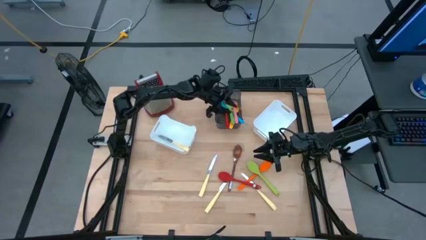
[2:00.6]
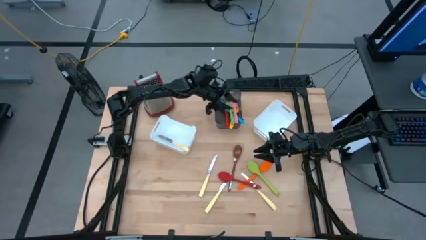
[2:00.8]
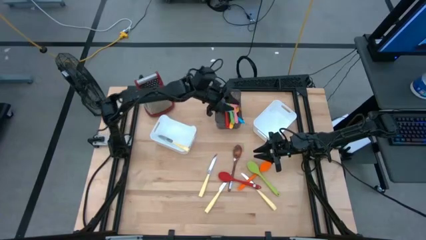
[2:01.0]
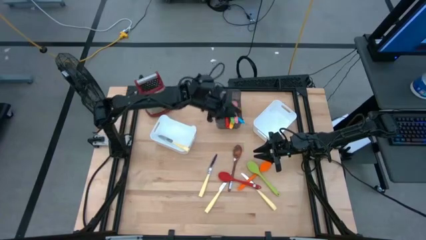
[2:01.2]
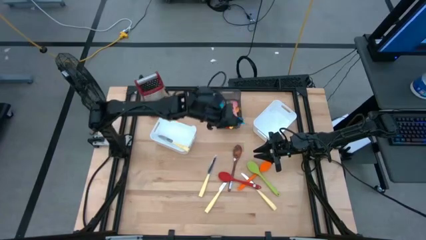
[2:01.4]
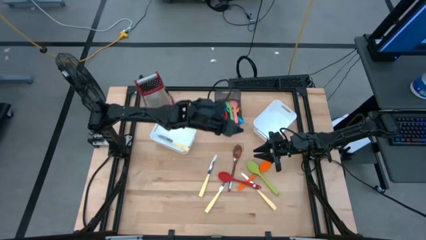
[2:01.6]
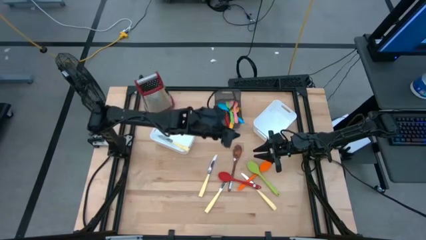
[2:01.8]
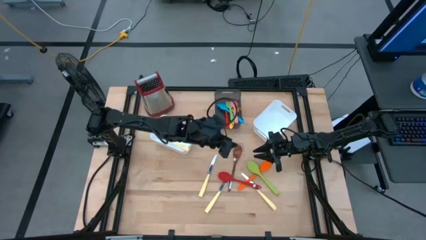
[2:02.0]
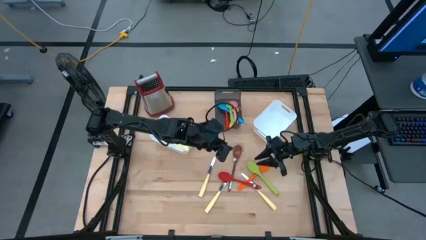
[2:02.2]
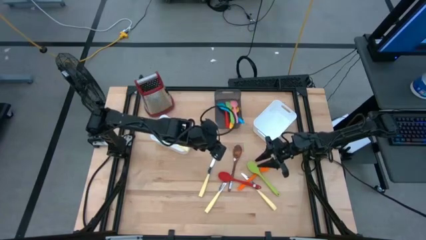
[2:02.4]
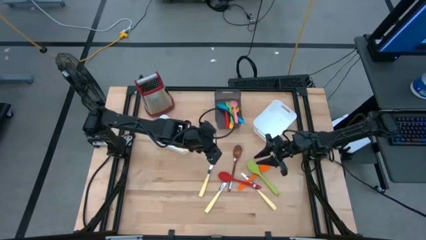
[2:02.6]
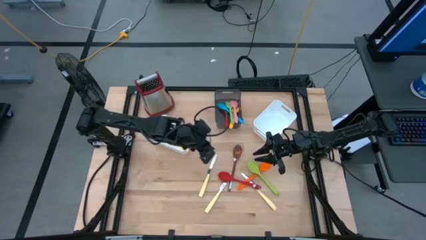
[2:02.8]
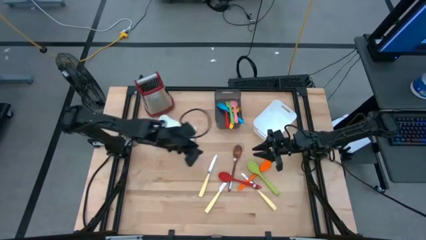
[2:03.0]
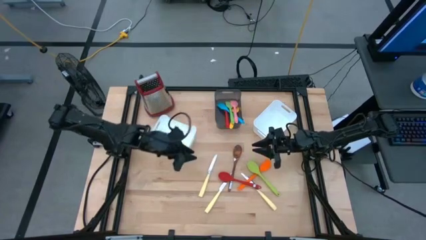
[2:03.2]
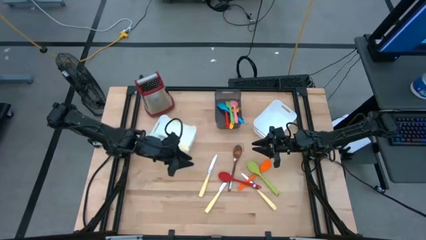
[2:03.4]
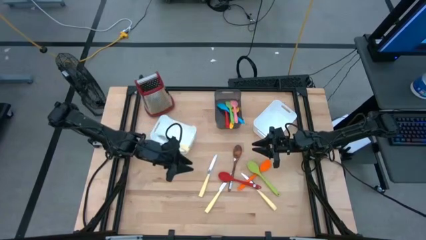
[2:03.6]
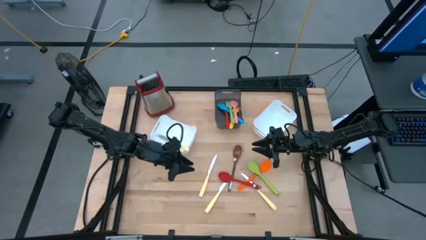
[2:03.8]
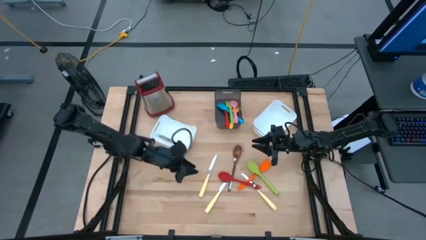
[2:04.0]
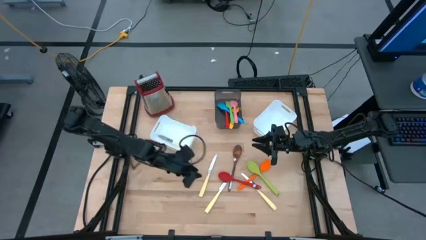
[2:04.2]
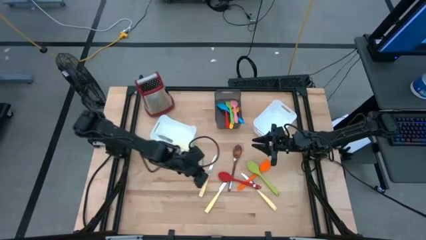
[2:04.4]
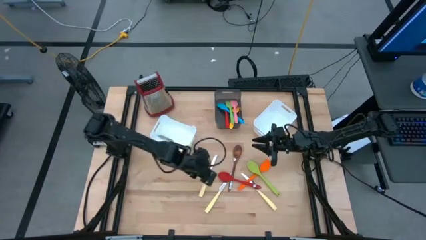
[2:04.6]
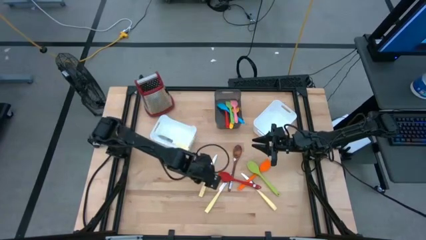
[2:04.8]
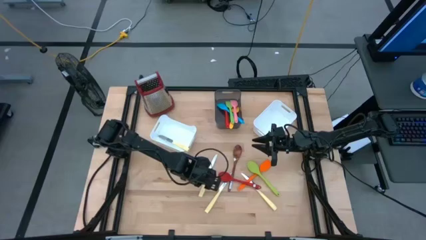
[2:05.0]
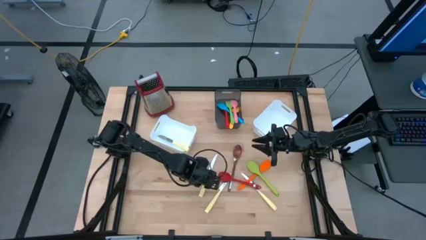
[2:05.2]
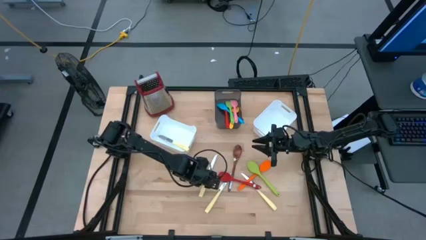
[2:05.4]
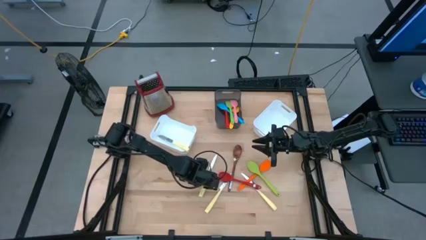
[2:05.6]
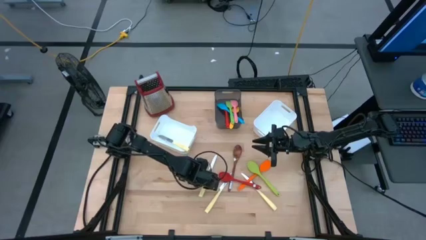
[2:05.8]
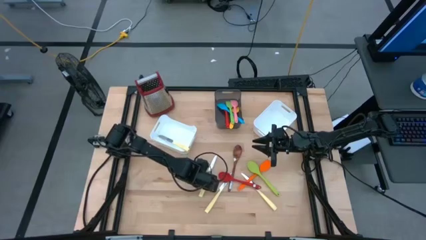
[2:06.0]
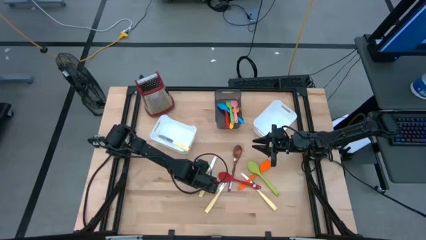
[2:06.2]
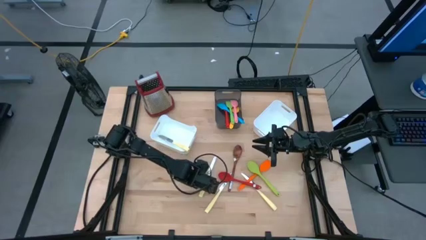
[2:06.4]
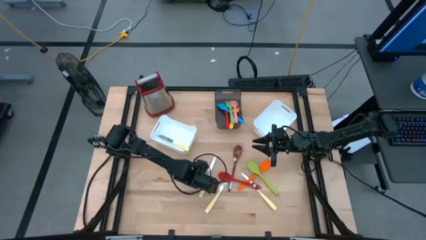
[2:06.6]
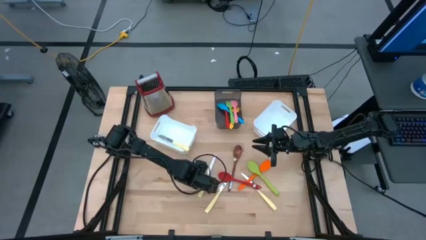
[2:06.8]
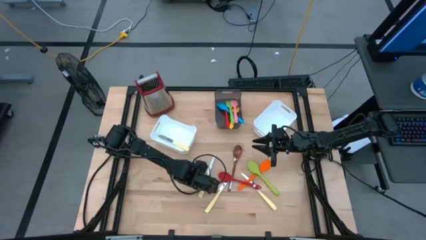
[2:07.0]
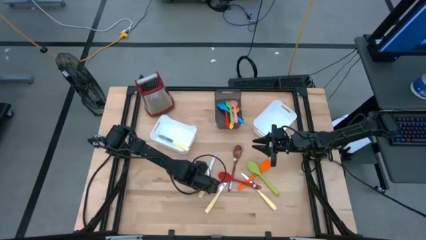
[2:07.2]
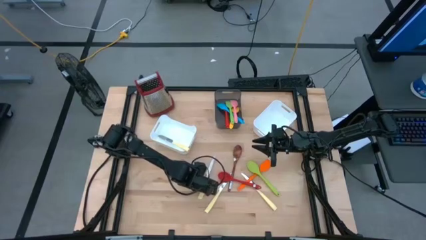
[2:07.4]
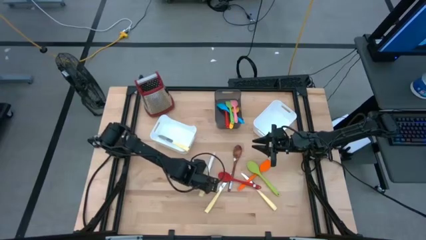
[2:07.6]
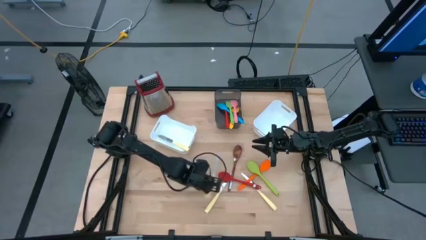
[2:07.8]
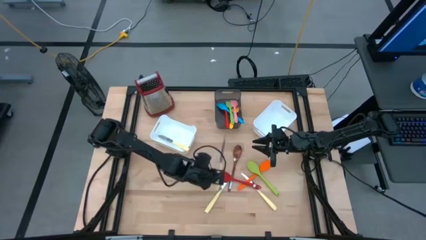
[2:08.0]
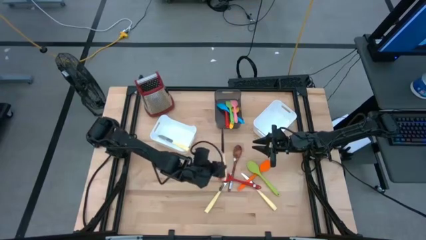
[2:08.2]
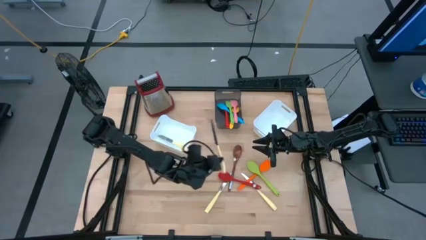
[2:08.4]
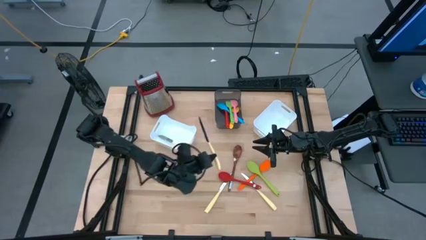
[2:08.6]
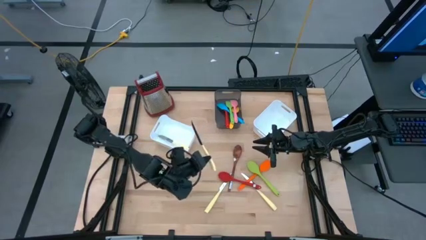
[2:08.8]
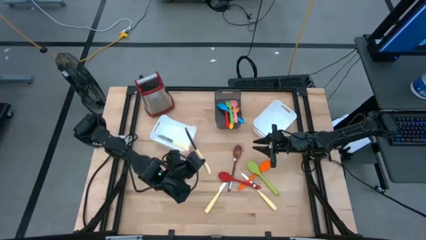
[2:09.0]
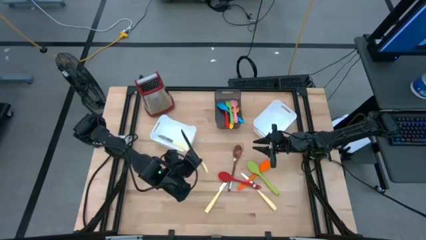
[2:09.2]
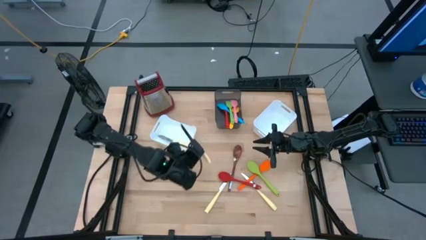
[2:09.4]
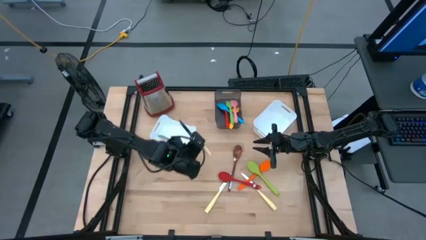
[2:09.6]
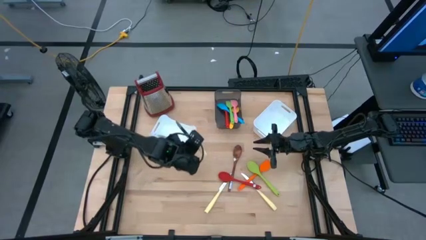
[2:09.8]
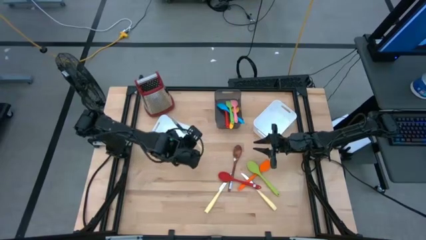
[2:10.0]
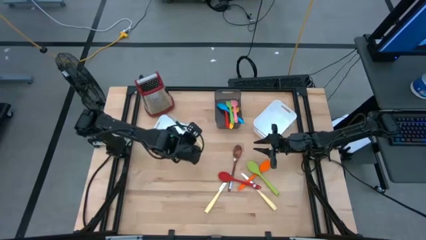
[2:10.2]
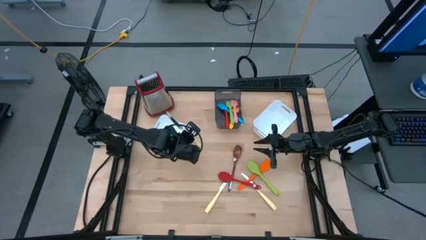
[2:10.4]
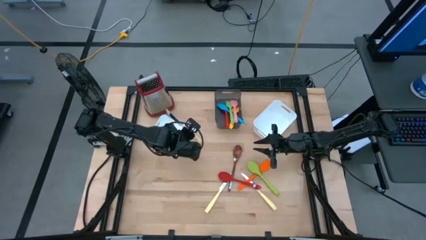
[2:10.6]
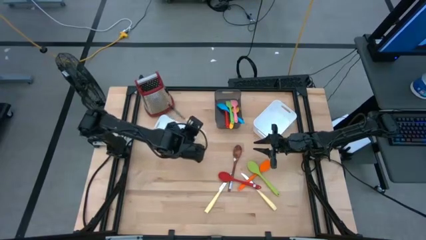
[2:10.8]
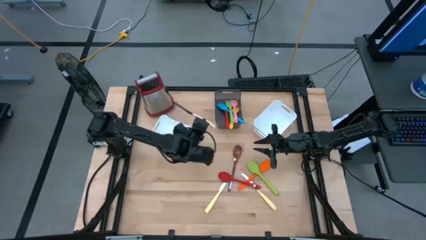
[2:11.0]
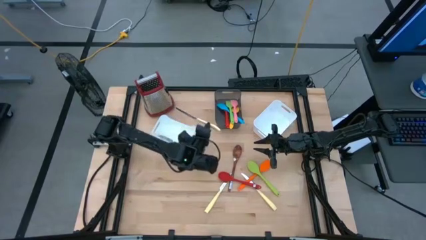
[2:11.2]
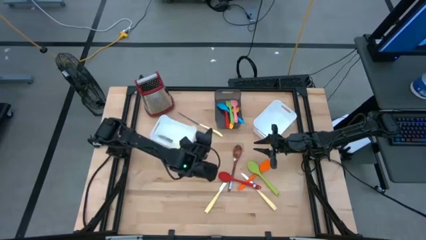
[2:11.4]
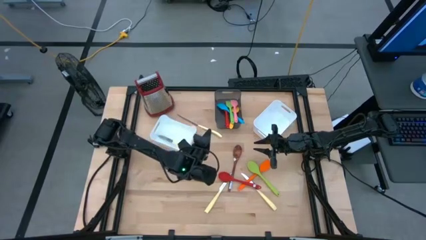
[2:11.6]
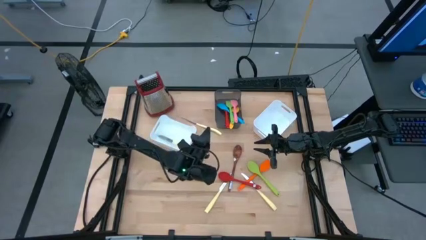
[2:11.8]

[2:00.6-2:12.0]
Task: Pick & Place Kitchen Items
Put the yellow knife into the left white bin
